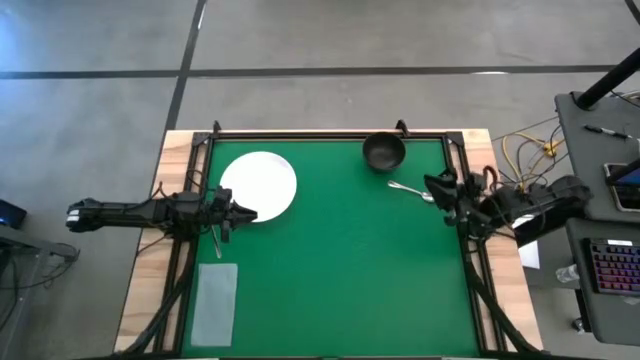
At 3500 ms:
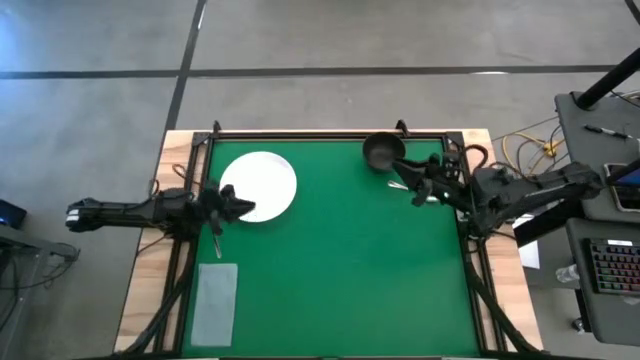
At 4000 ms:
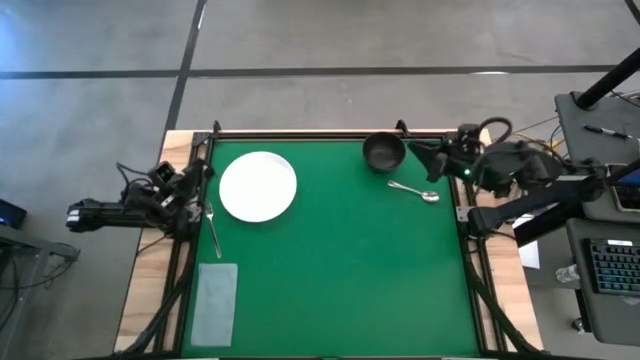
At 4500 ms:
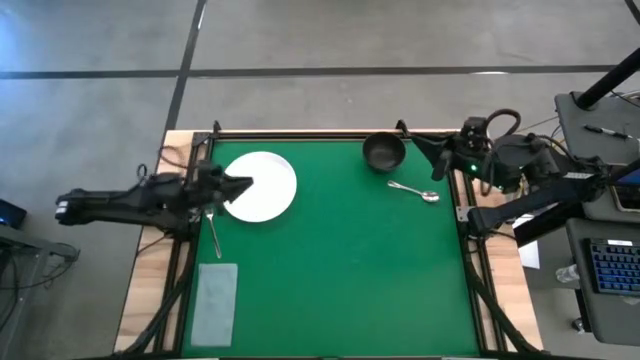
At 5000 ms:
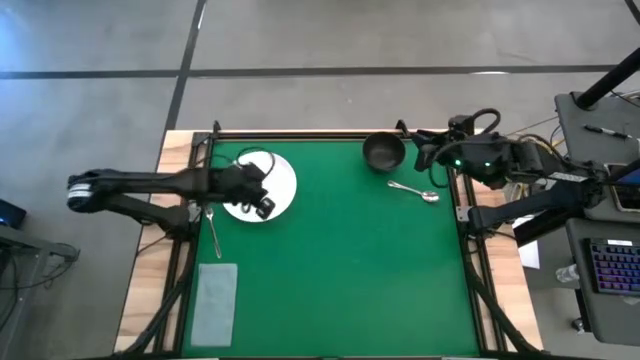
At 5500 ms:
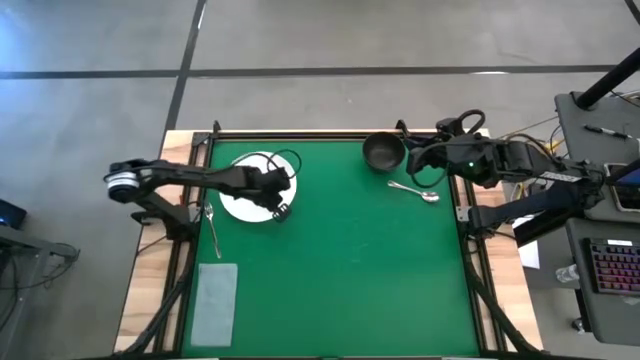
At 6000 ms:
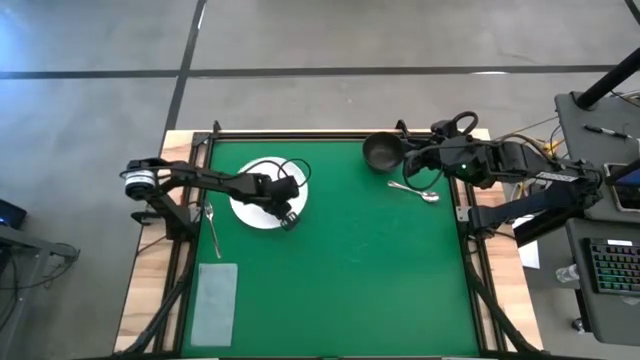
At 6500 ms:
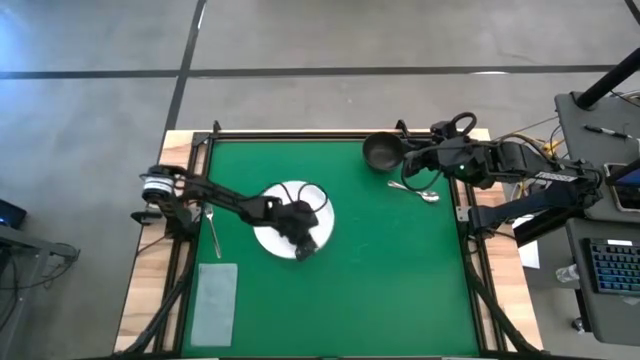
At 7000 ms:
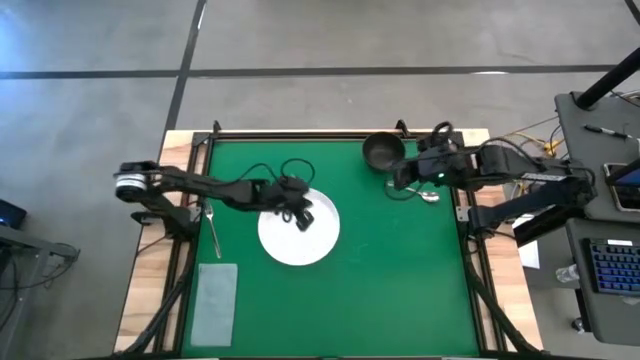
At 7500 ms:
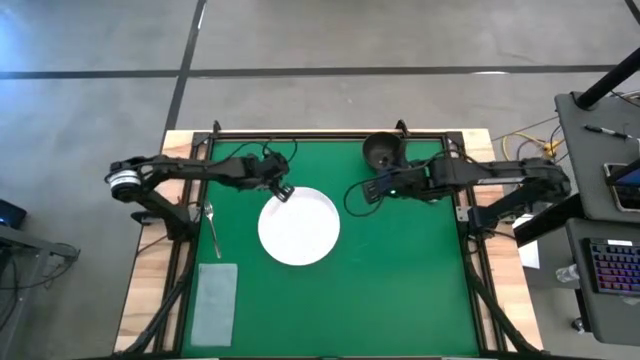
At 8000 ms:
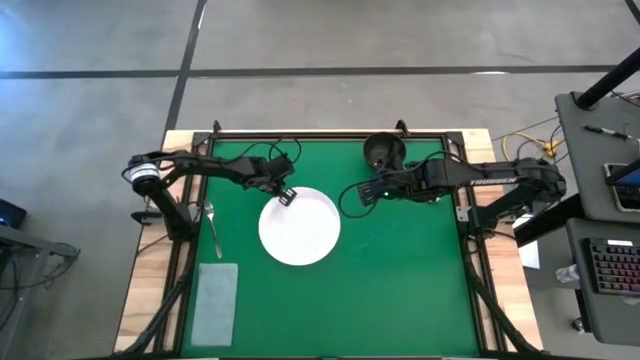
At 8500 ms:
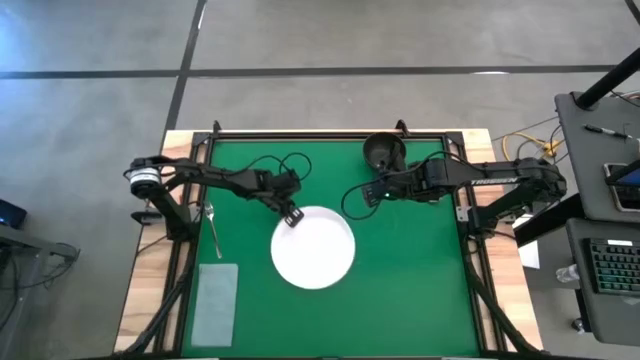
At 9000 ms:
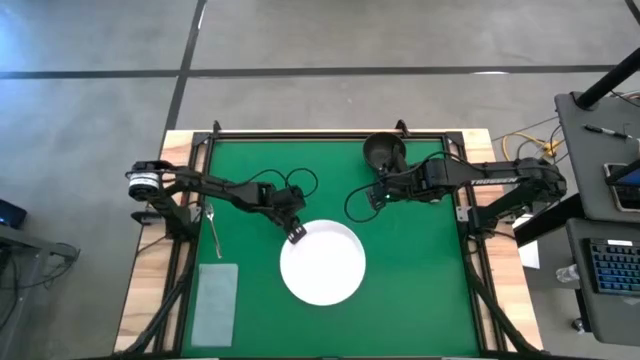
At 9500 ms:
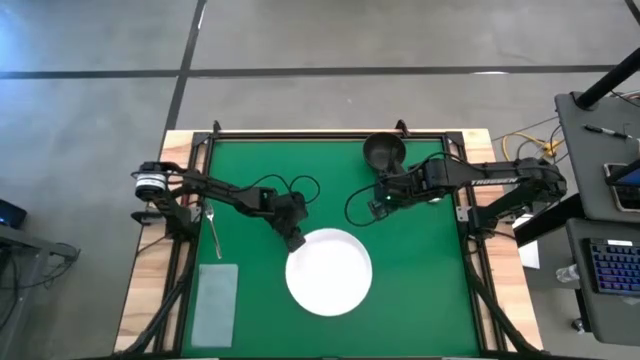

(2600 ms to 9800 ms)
Task: Set table place
Move the white plate to the center of the table

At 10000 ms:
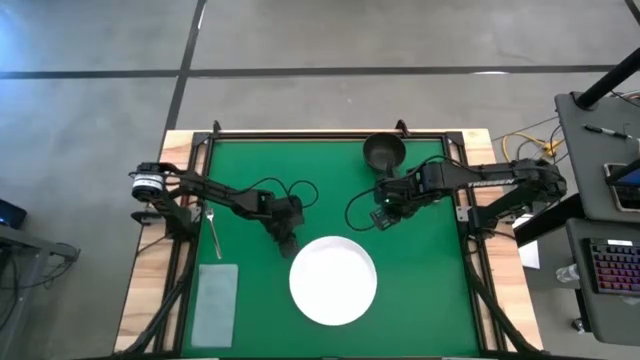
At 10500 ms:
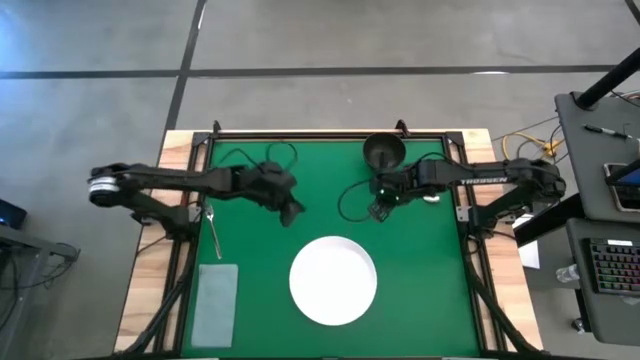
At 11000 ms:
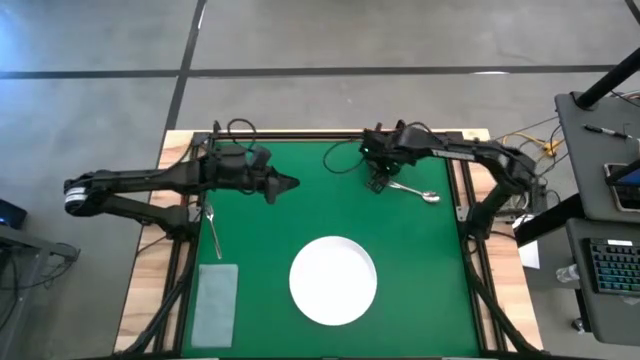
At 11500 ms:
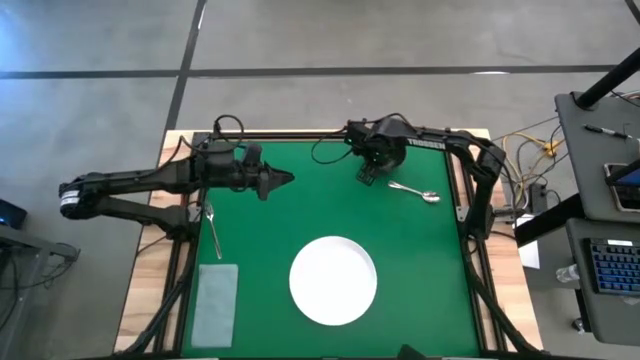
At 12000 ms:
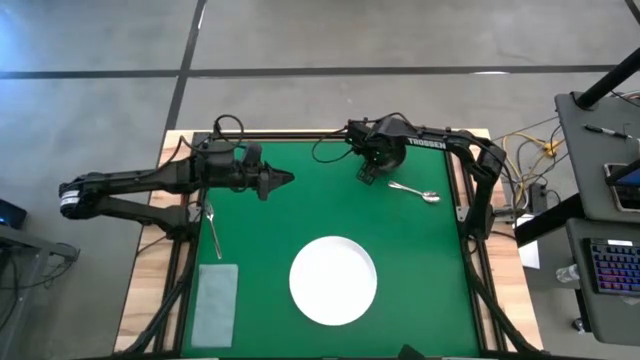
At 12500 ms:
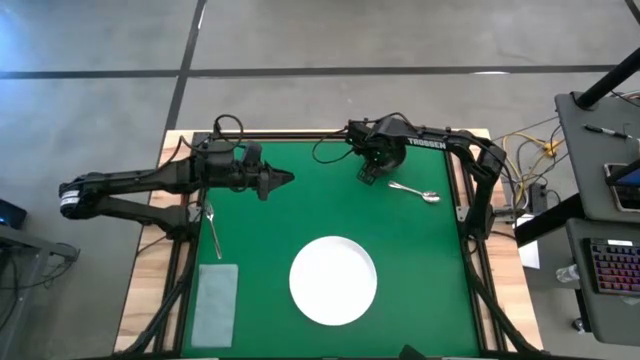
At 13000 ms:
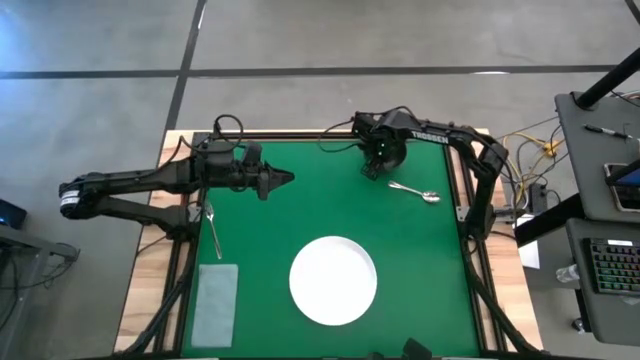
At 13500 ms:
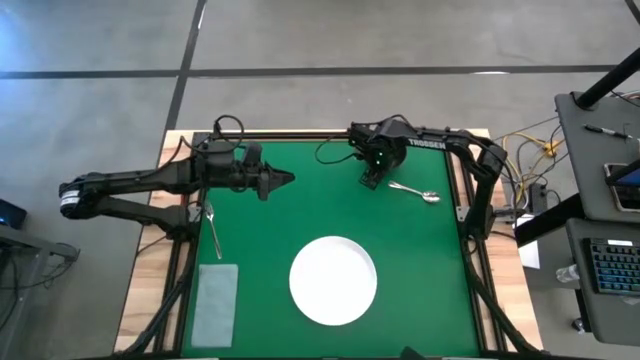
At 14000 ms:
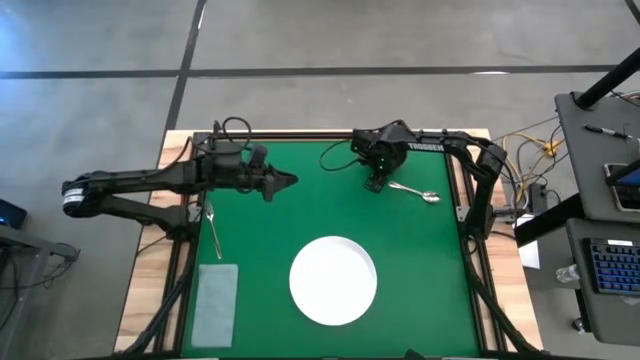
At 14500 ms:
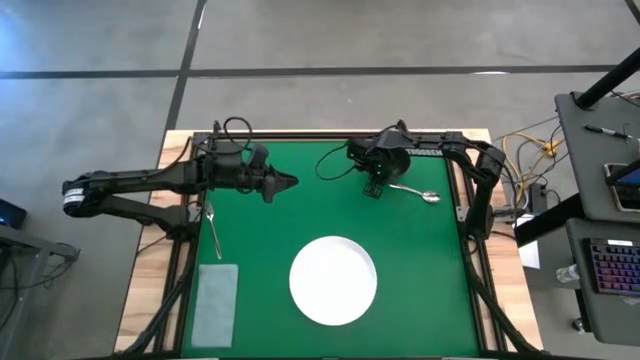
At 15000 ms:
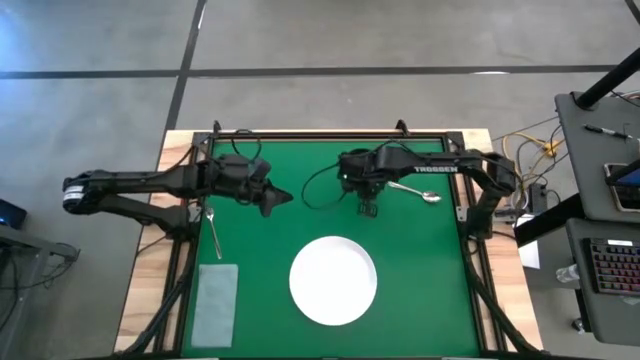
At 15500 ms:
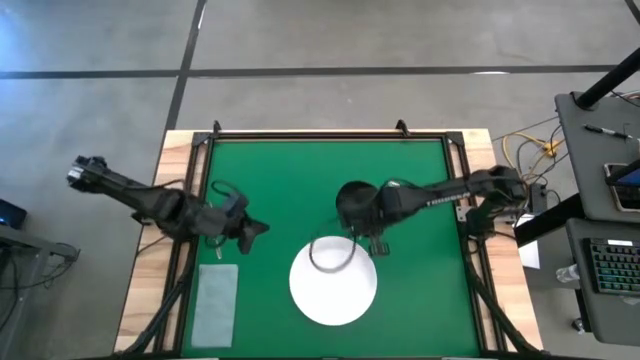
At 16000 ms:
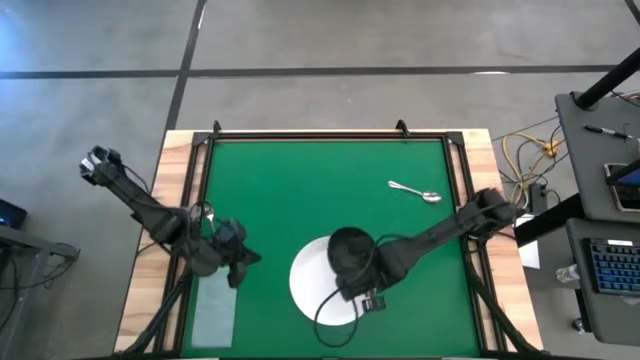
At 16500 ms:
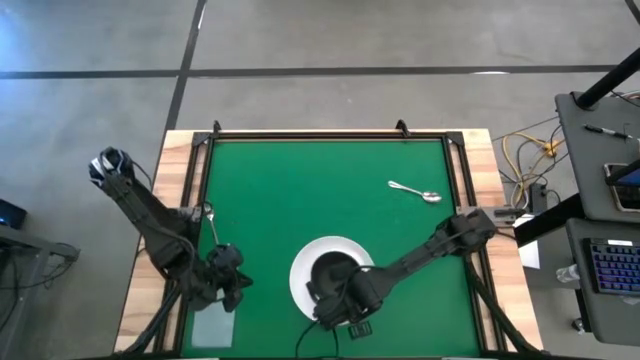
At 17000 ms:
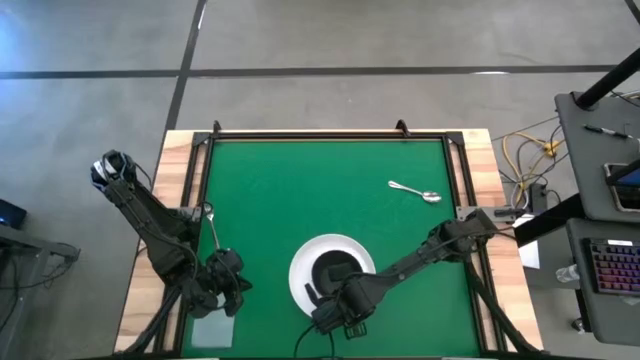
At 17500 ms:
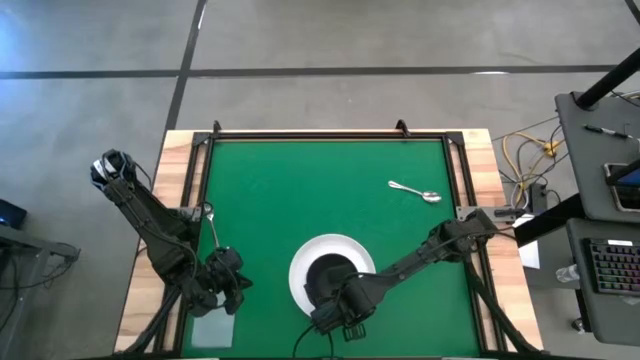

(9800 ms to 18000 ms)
Put the black bowl on top of the white plate on the table

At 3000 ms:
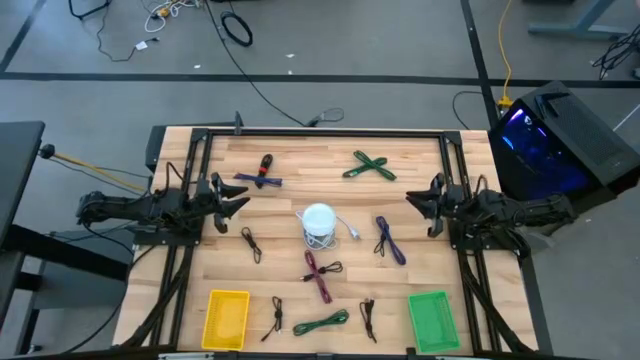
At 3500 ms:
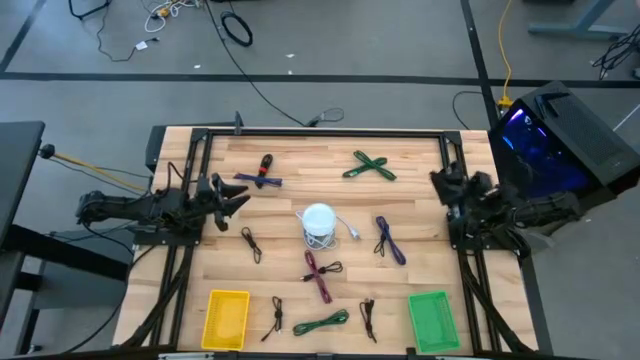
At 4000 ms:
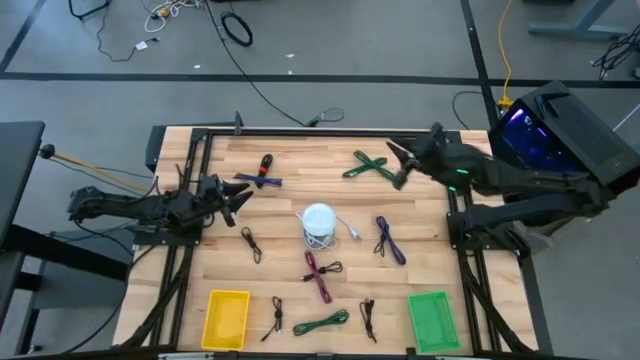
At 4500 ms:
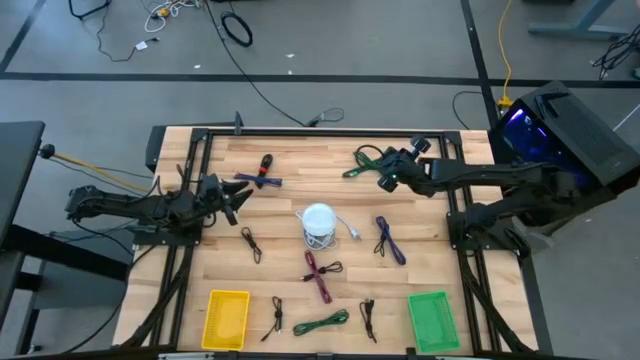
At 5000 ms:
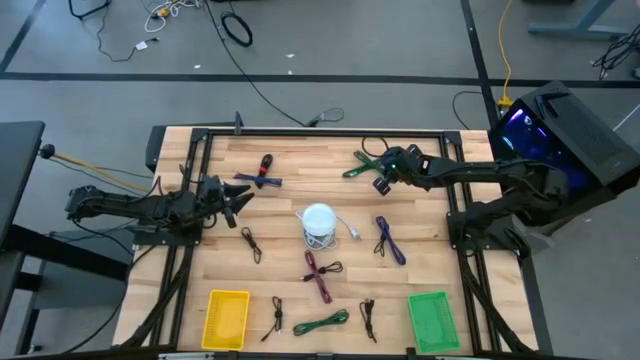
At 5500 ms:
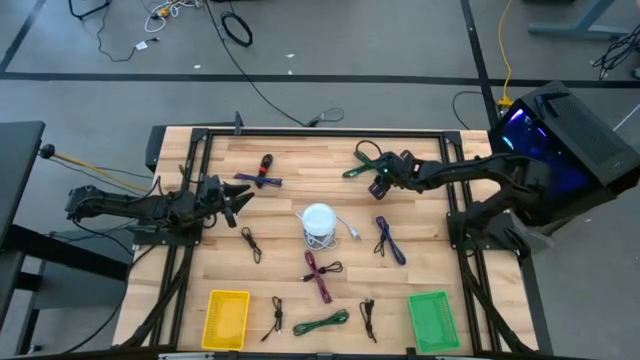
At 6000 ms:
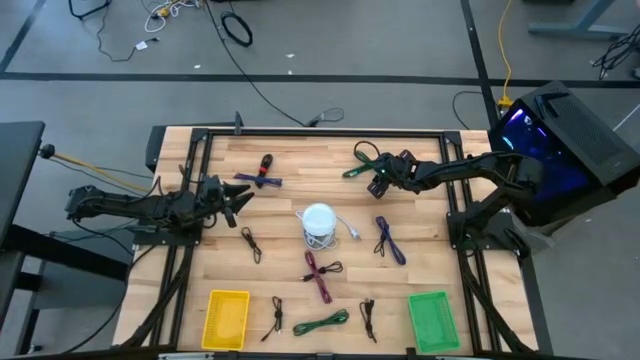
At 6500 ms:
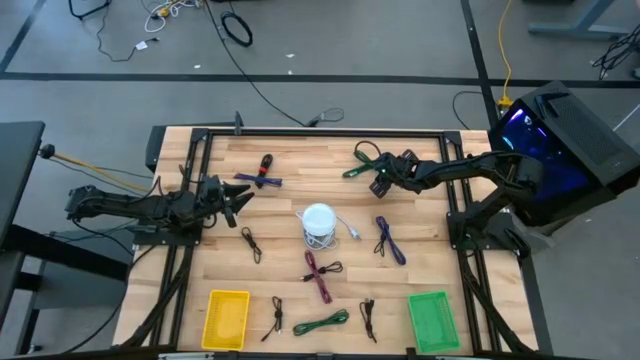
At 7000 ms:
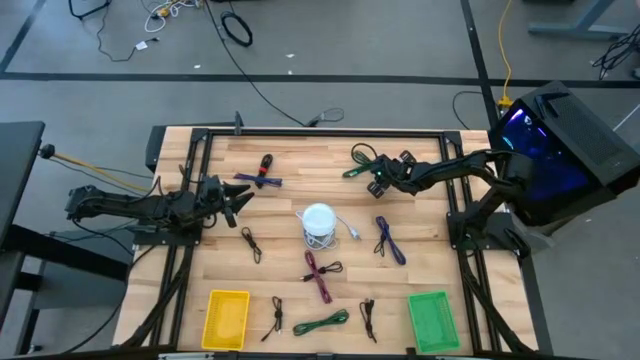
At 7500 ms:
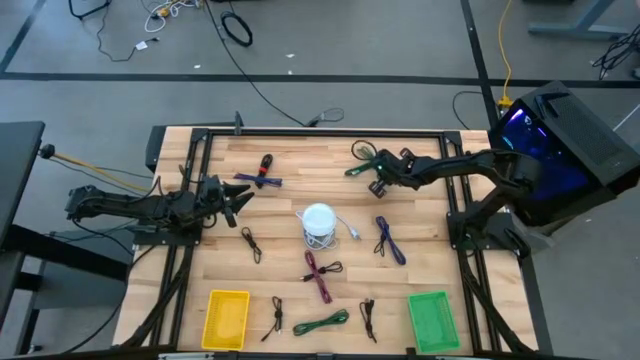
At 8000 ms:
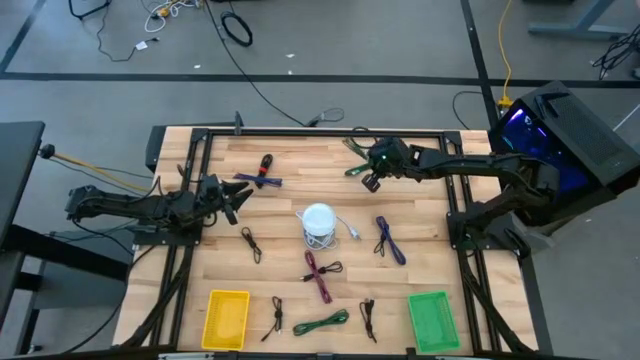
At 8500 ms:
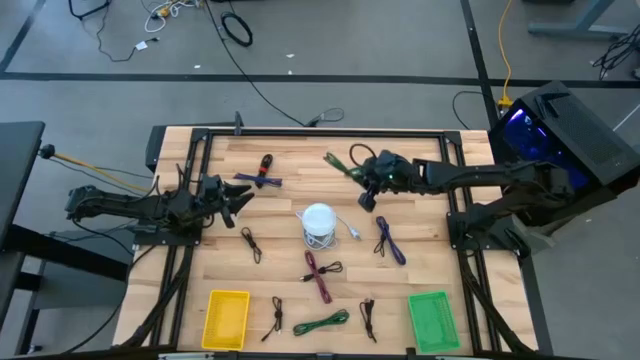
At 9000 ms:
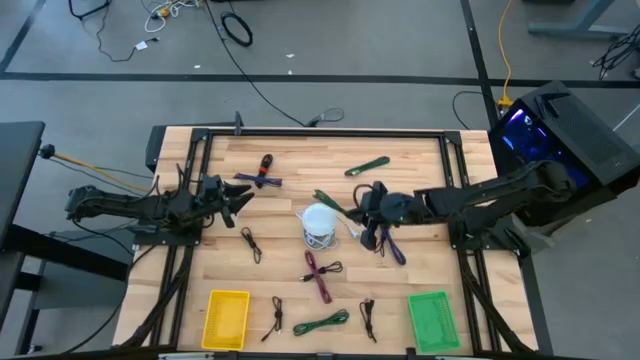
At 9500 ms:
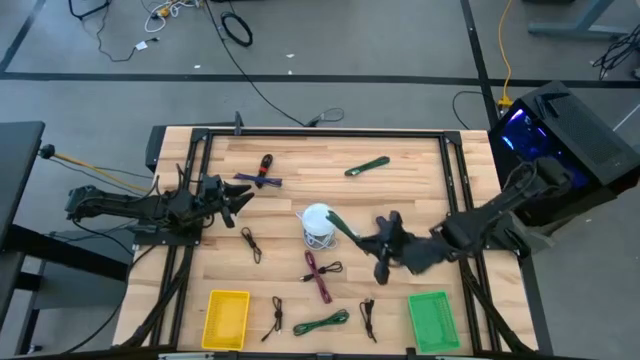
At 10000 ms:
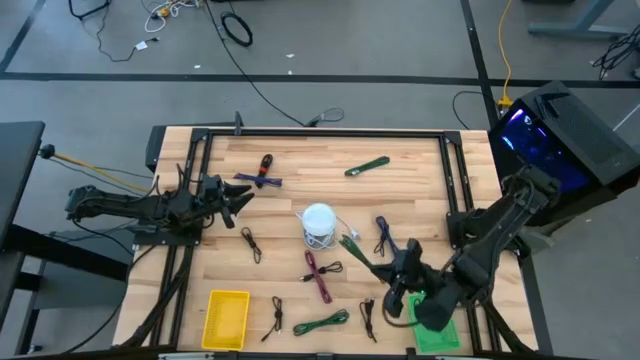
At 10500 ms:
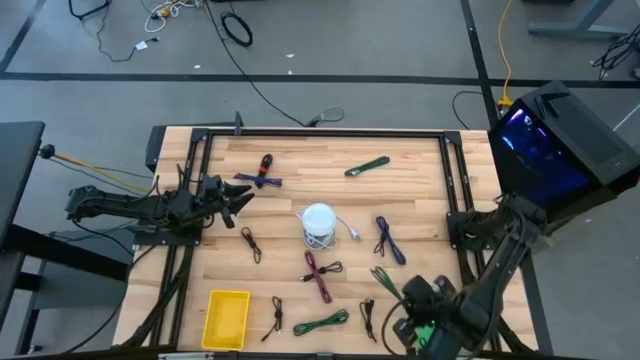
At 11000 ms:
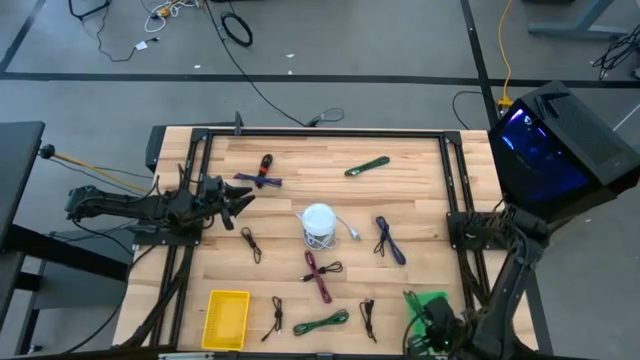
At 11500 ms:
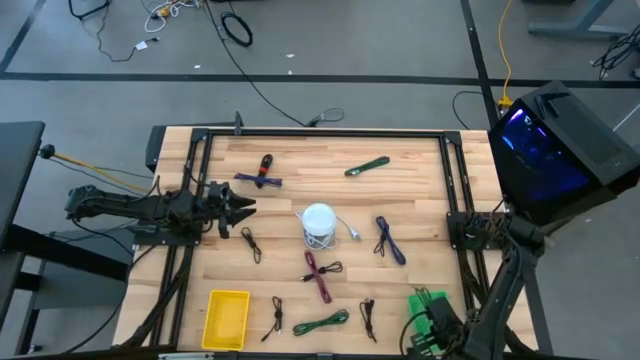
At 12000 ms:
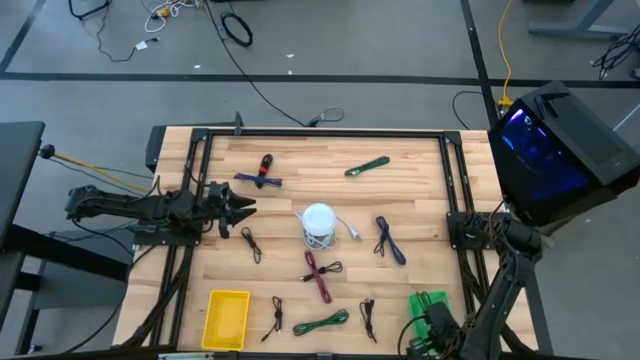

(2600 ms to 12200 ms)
Task: Pick & Place USB Port
Put the top green charger cable into the green bin
